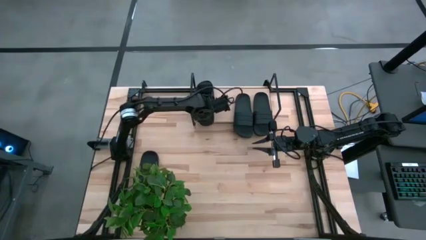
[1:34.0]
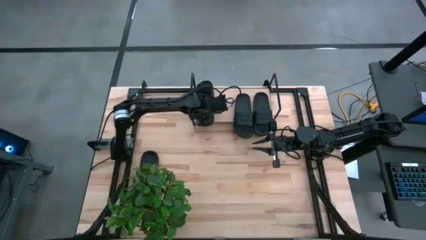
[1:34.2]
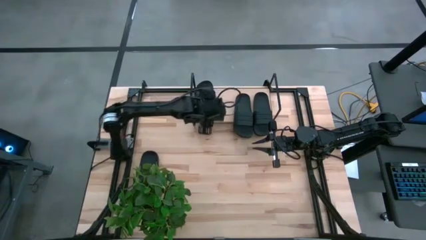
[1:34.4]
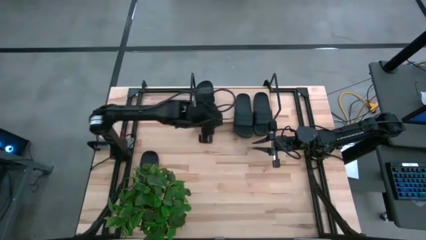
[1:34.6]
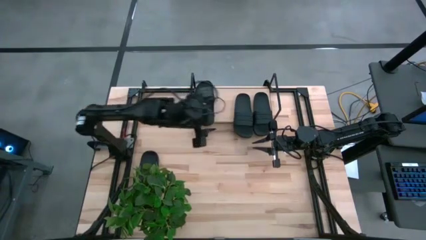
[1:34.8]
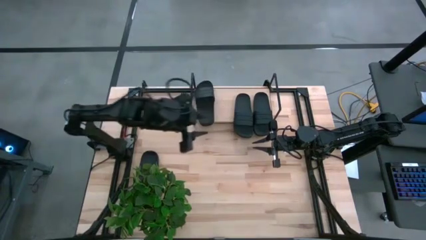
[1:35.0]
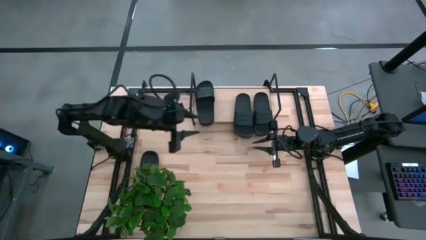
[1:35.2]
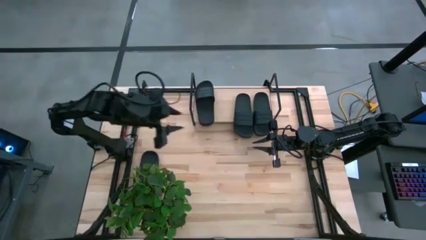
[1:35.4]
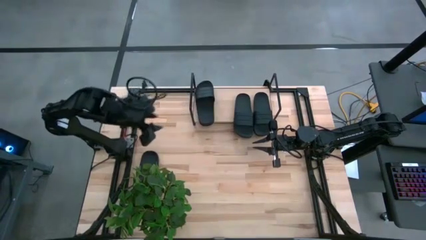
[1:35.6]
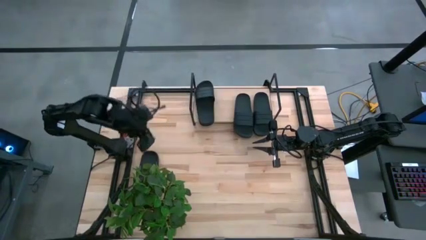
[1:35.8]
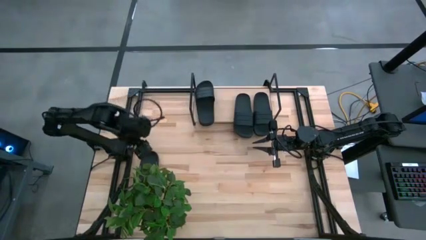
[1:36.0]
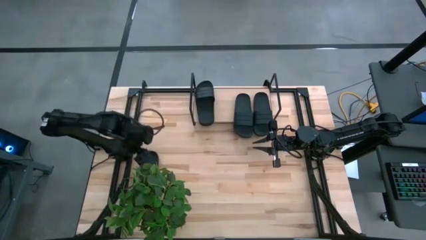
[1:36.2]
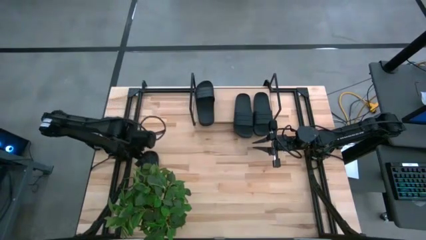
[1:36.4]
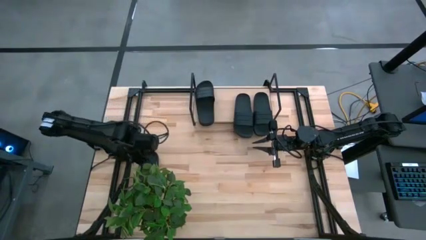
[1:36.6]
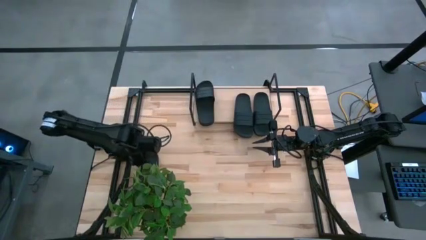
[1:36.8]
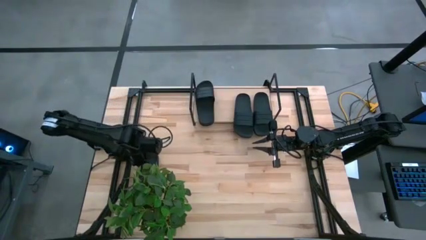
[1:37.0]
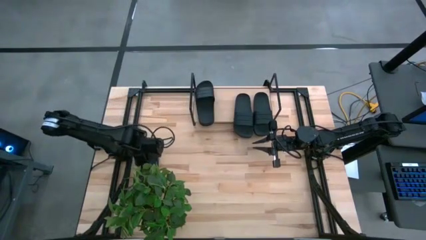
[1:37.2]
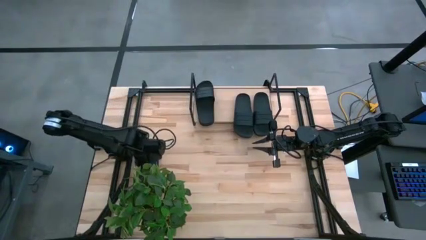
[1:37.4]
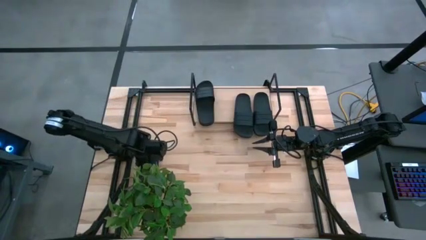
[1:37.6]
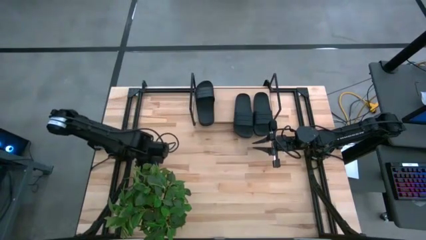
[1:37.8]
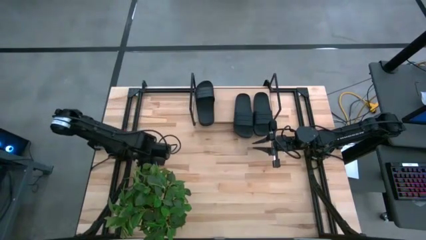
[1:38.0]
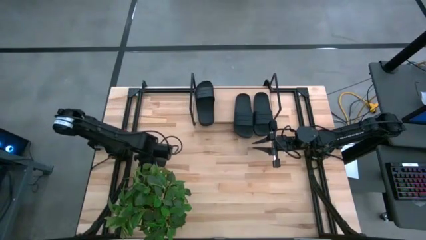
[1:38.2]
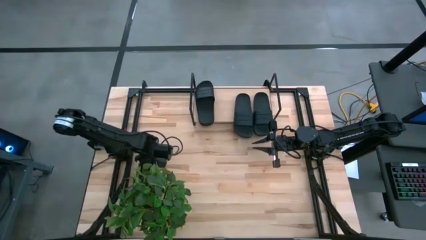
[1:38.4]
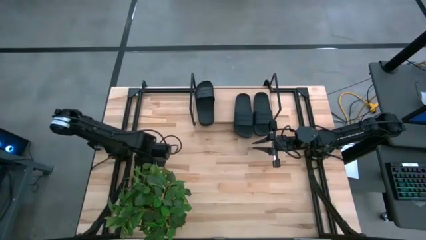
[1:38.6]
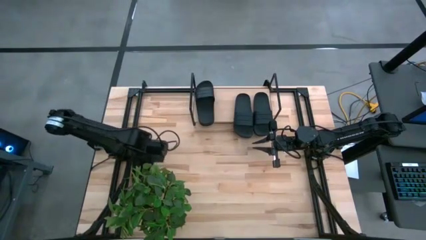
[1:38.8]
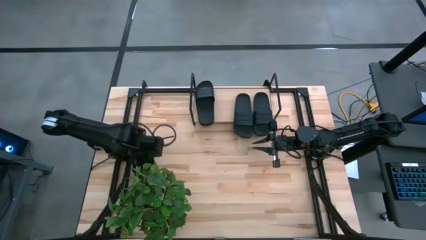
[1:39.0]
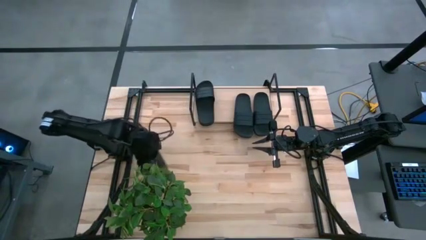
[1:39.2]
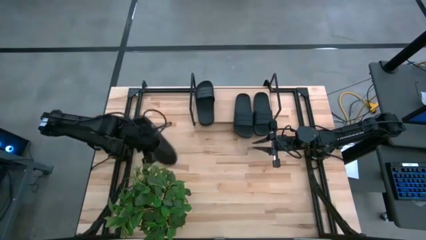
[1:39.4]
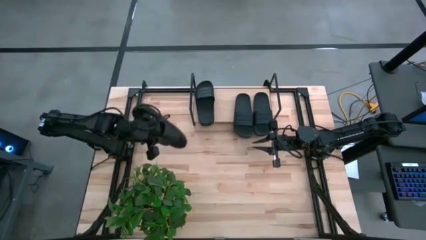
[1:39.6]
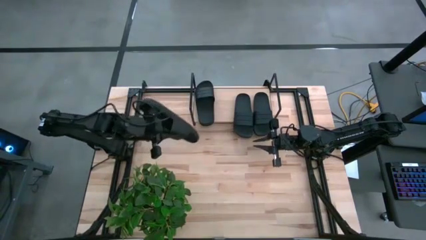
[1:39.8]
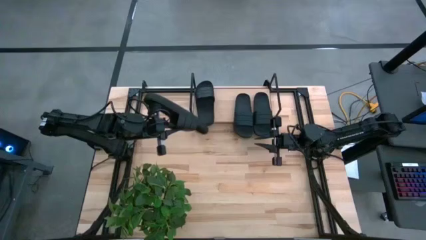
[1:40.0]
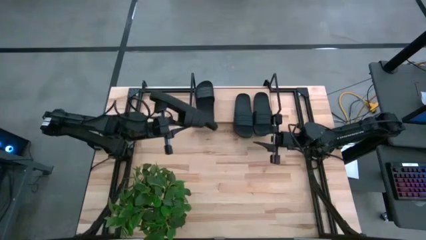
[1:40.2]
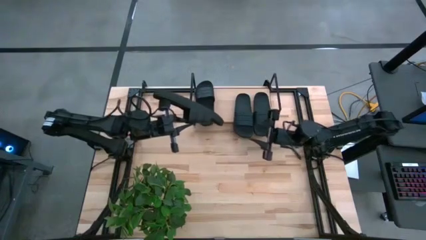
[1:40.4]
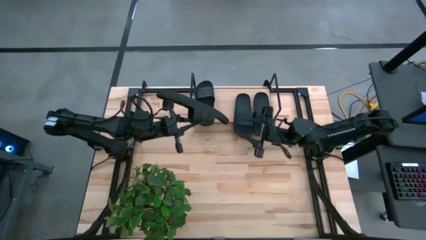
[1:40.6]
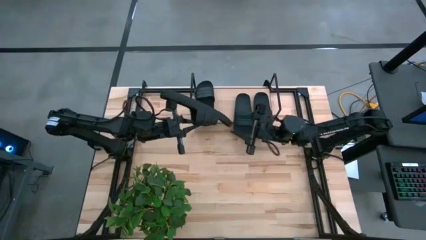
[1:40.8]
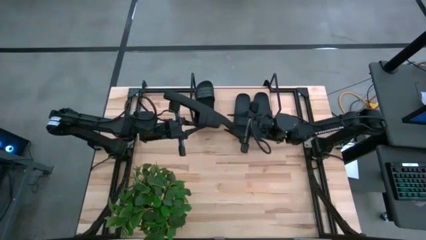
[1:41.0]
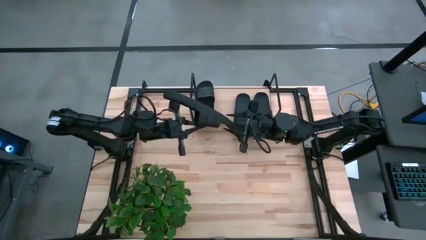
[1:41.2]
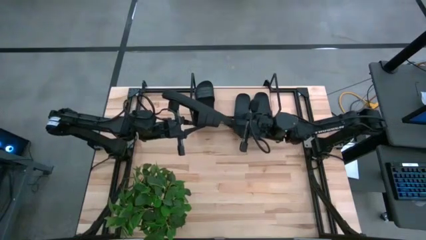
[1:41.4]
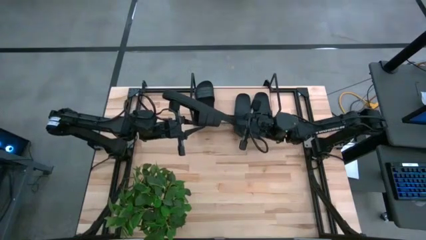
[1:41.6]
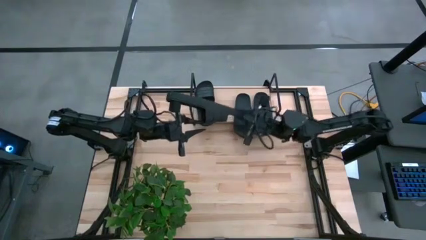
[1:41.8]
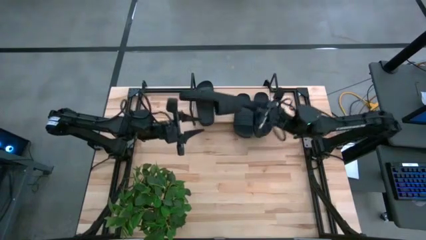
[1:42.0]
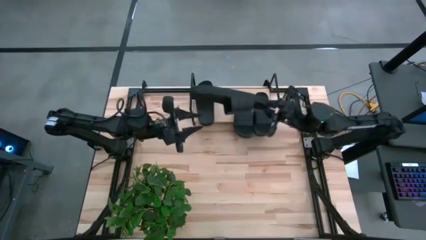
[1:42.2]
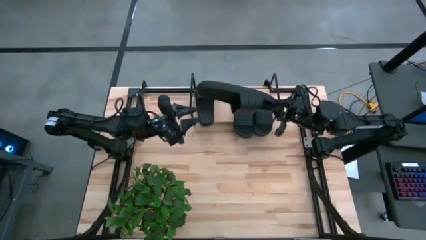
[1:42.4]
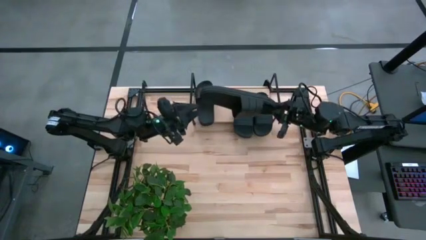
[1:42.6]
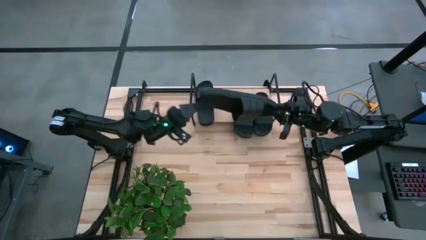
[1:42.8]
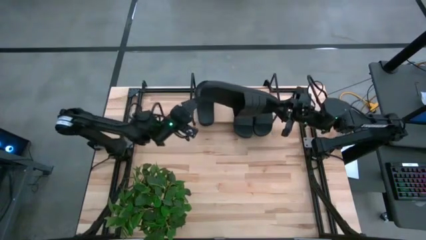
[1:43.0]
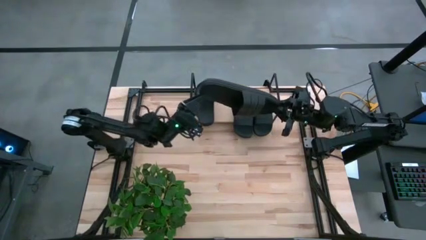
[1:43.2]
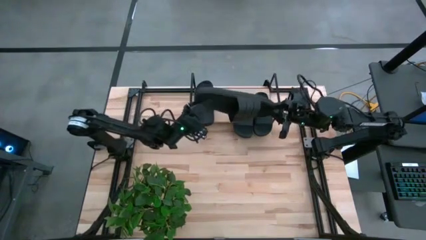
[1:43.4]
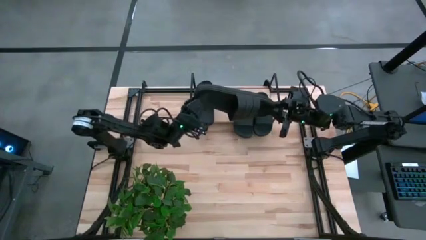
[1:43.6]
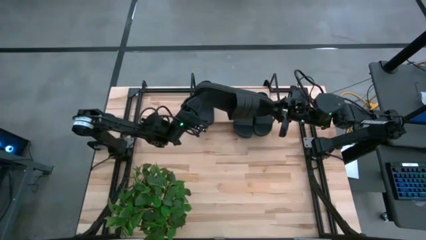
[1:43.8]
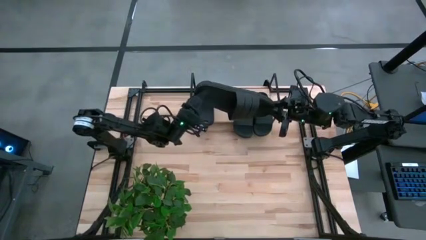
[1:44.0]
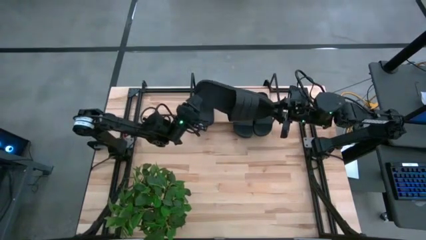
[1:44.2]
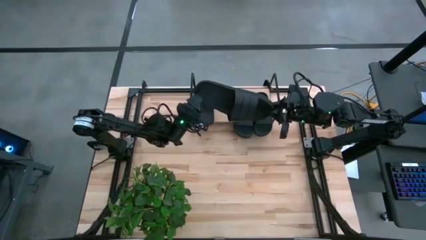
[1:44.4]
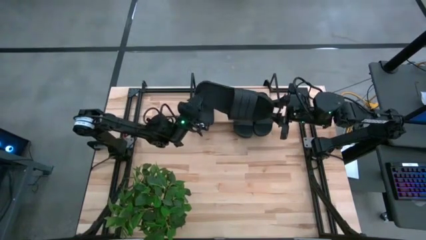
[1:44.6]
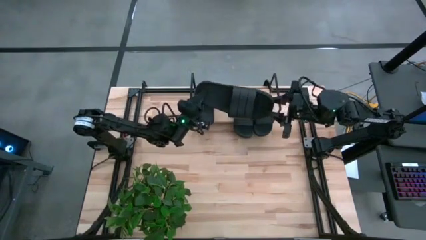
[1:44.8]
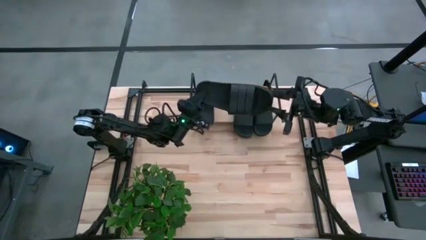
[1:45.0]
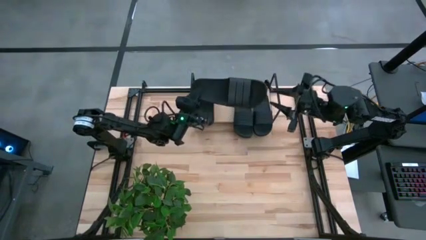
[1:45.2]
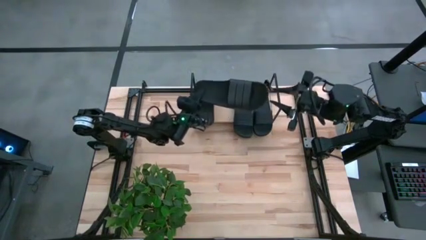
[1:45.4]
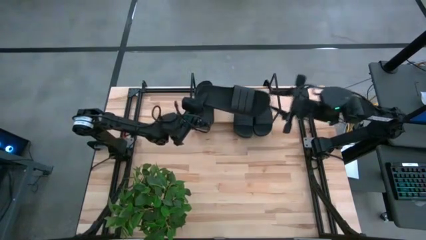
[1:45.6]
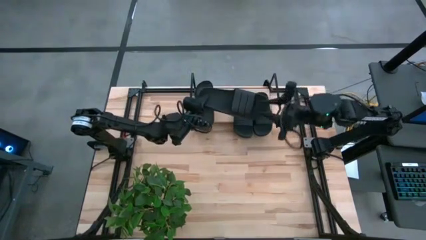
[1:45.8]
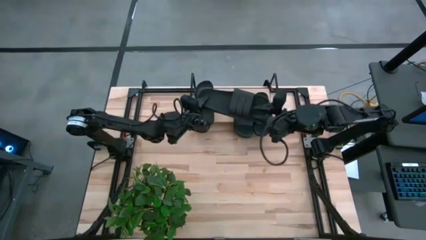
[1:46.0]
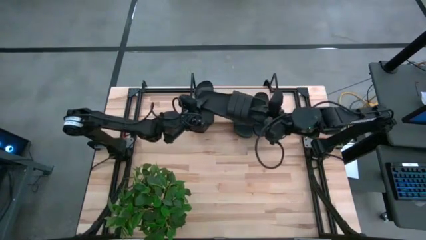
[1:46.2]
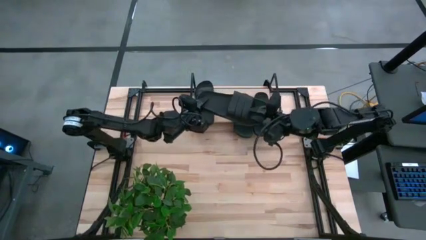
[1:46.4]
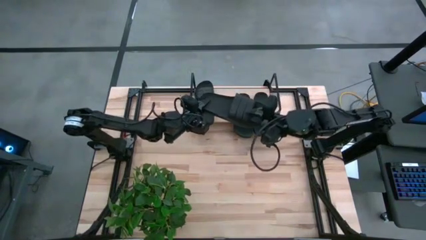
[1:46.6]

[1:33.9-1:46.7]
Task: Pick and place slides into the shelf
Put the black slipper on the shelf

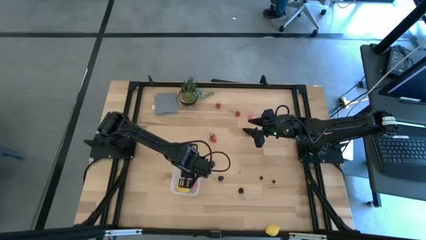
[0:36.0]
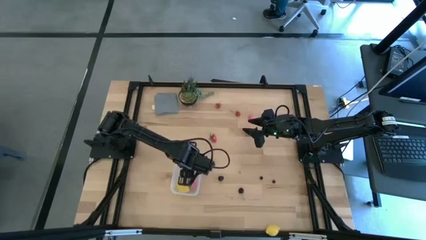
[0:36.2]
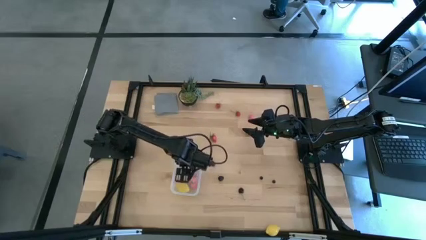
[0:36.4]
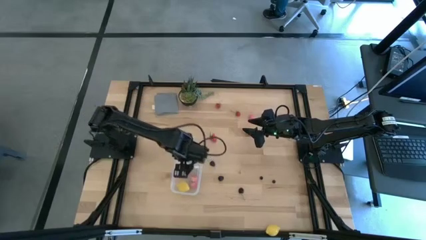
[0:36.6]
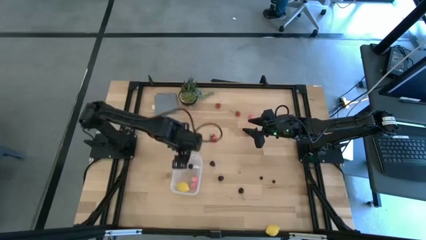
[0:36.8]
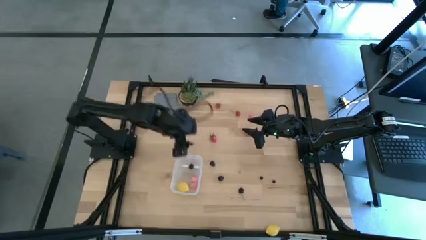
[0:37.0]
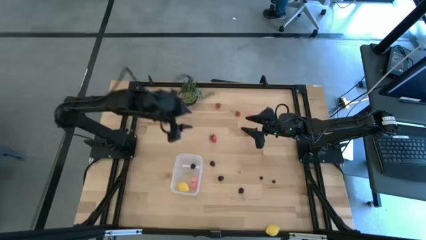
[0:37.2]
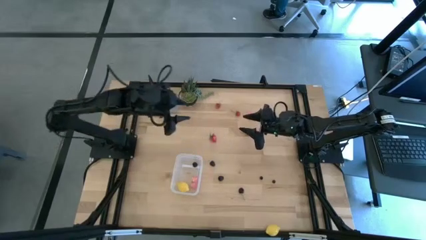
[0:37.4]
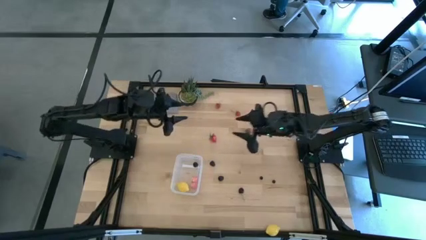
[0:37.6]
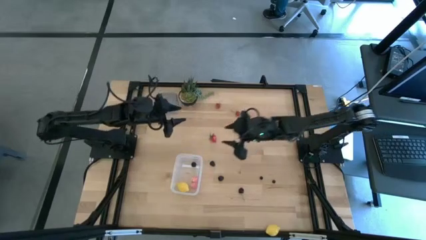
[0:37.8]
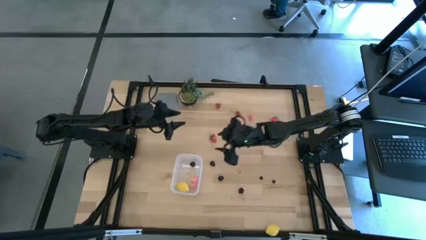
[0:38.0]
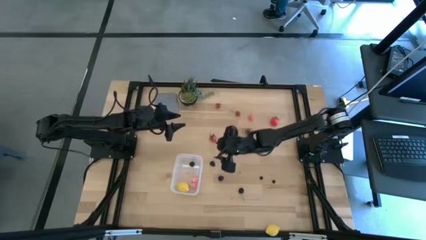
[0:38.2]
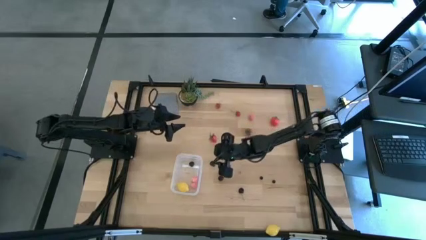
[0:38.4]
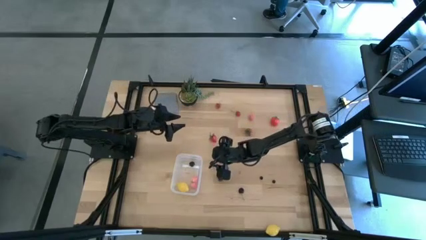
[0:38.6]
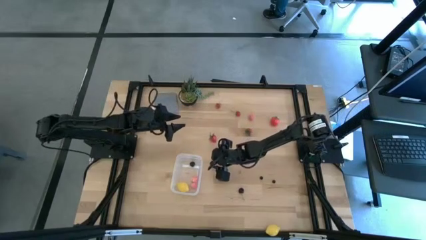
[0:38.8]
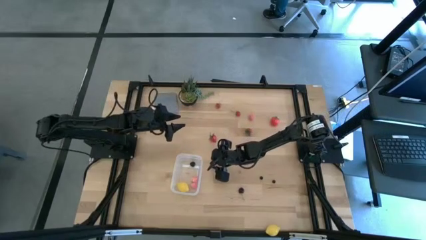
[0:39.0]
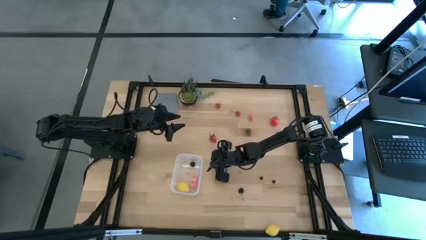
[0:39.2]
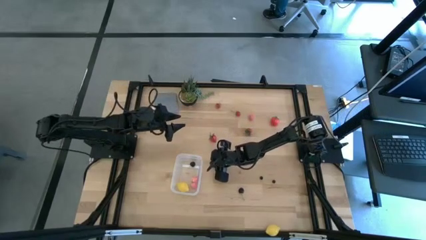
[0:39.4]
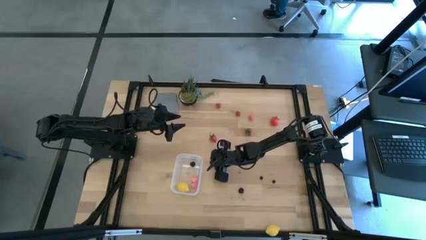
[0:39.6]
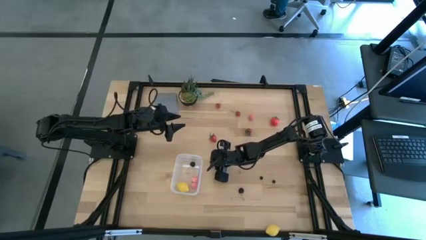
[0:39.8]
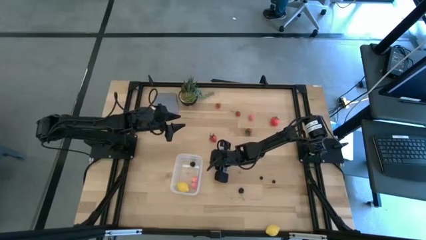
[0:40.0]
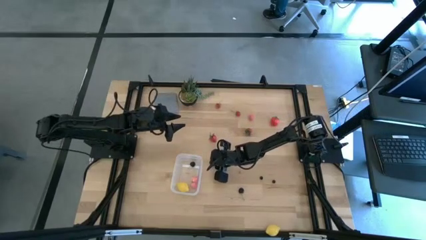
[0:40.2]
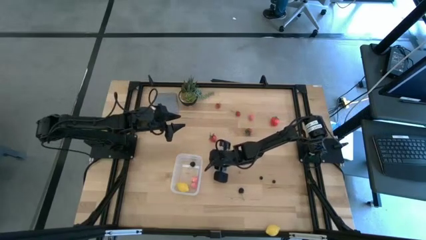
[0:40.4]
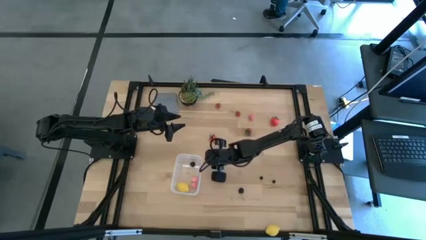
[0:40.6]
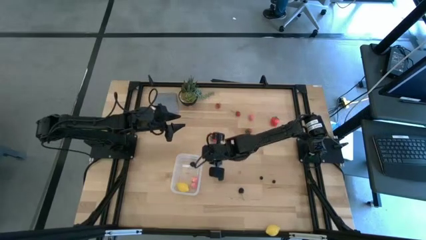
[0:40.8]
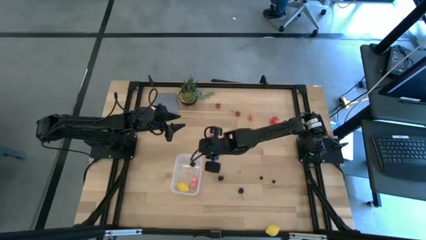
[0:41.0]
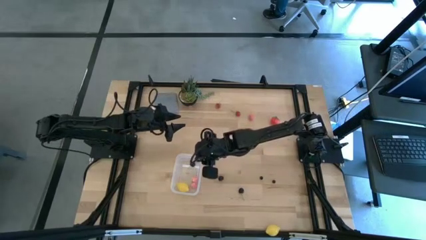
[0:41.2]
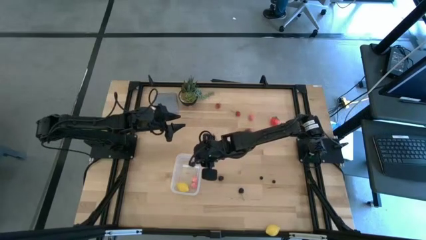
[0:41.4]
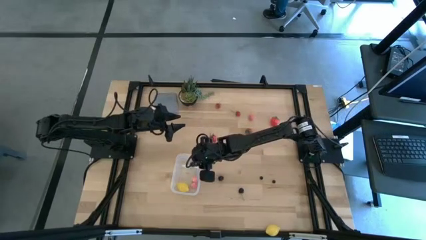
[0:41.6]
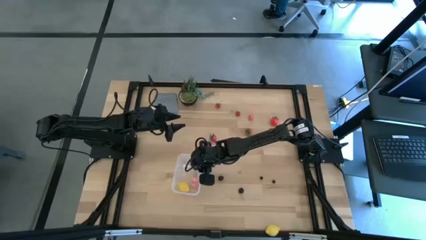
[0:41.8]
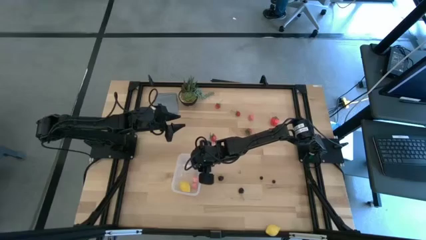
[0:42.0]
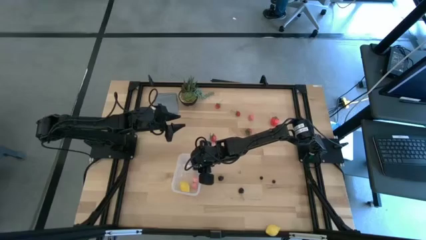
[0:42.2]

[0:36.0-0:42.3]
Task: Pick and placing Produce into tupperware
Put the blackberry into the transparent bin
